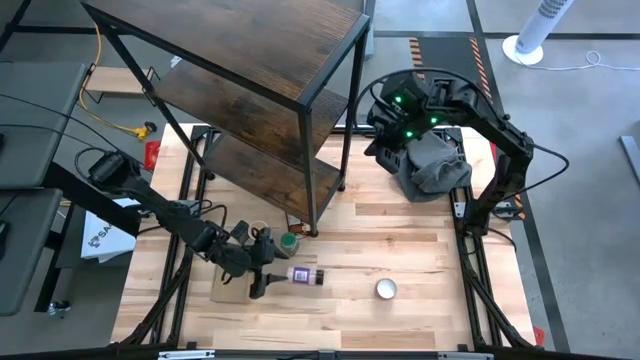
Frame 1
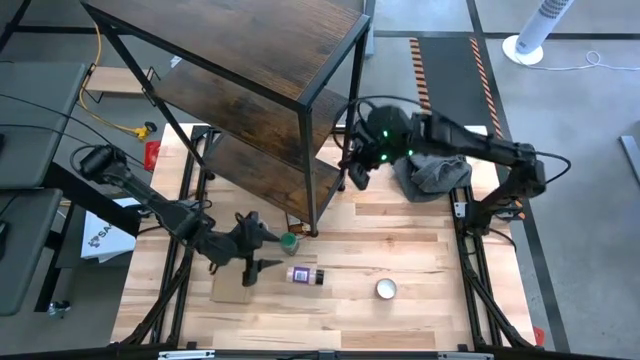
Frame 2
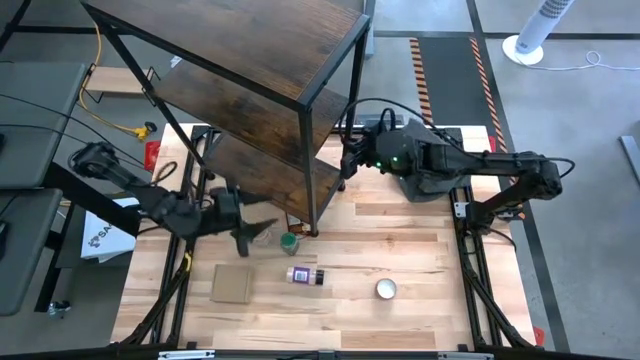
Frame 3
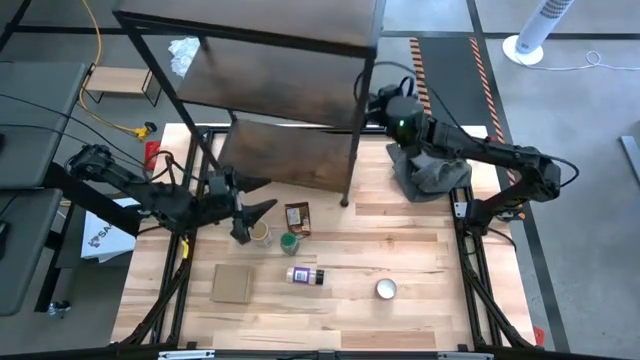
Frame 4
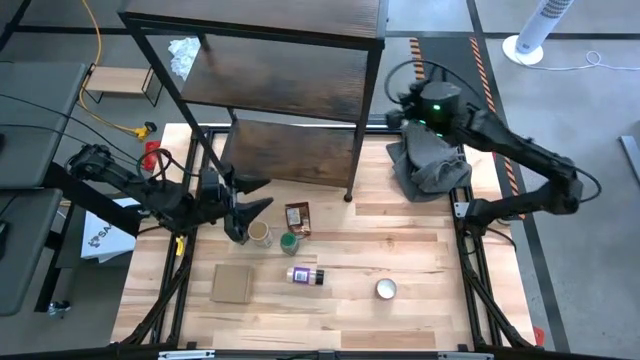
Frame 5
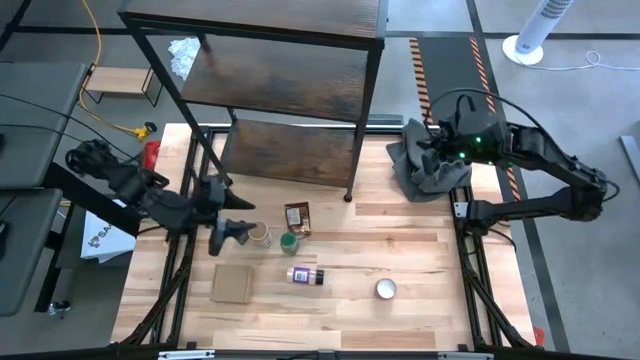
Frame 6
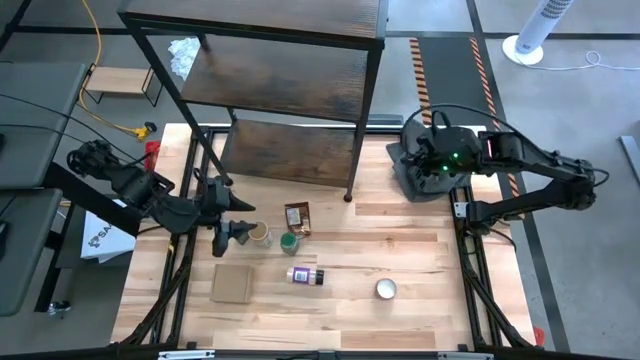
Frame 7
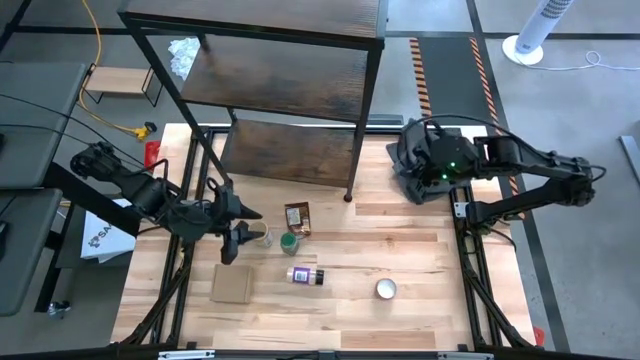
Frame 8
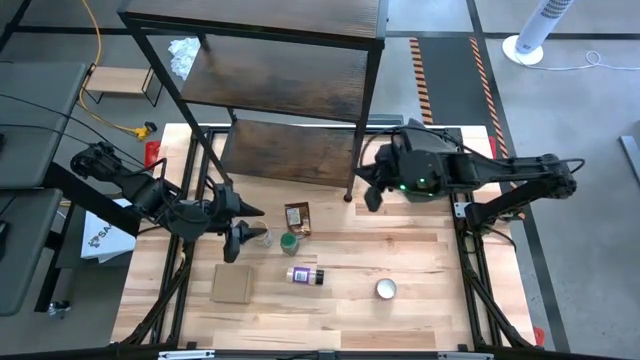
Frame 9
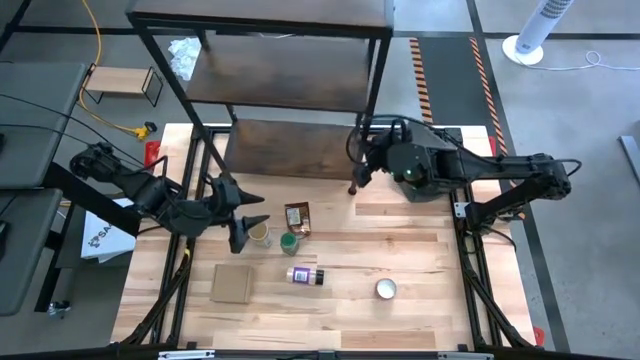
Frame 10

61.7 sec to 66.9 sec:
Task: Shelf spices
Adjust the shelf

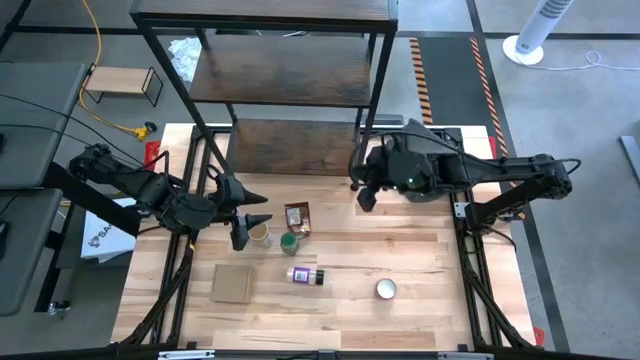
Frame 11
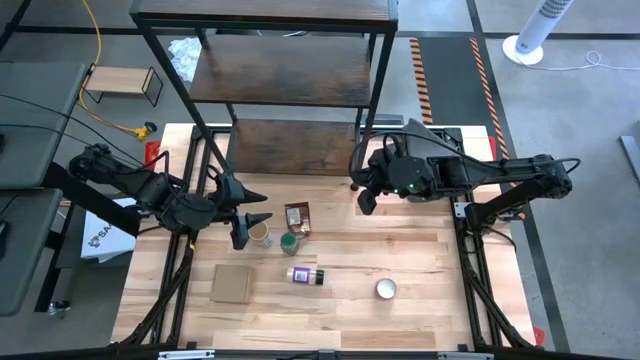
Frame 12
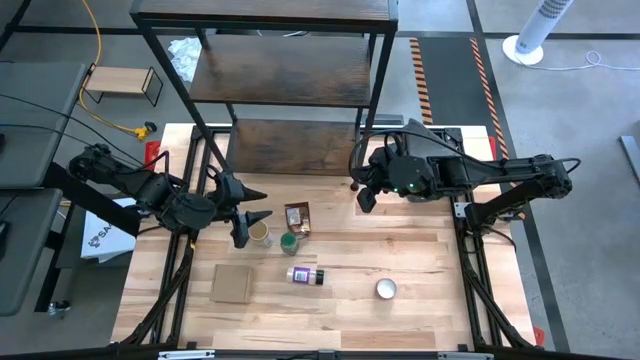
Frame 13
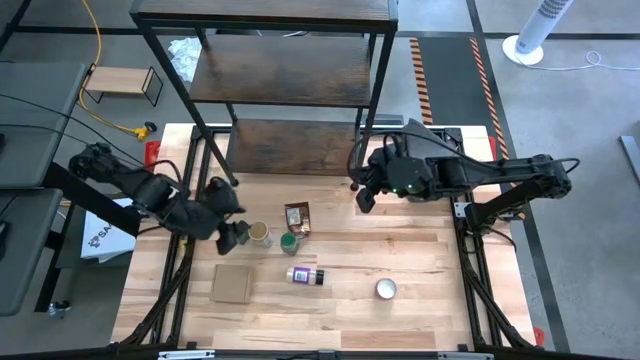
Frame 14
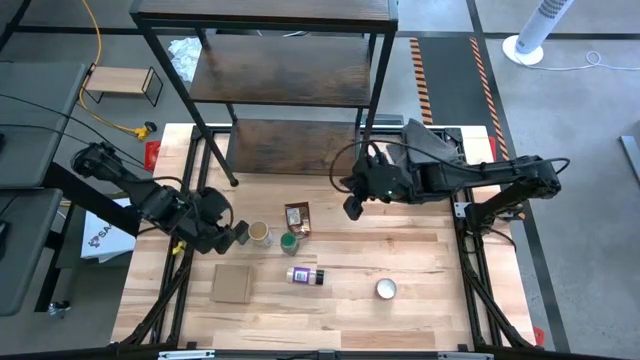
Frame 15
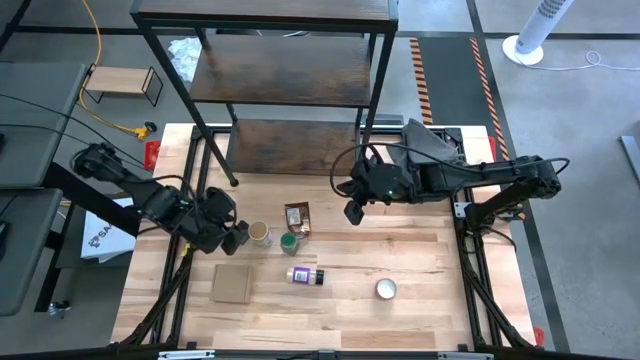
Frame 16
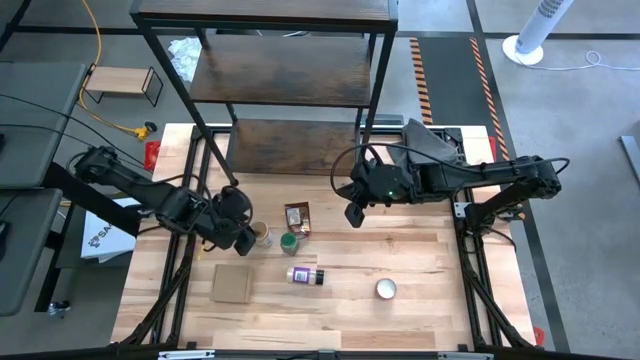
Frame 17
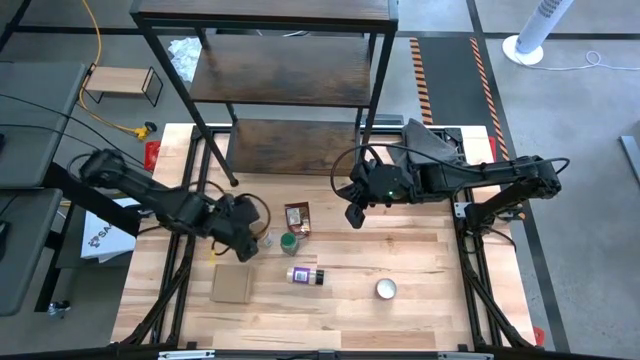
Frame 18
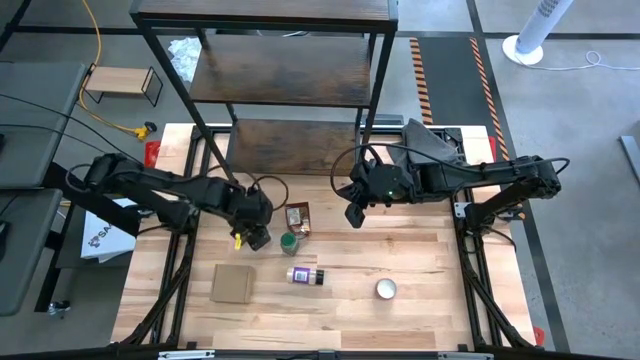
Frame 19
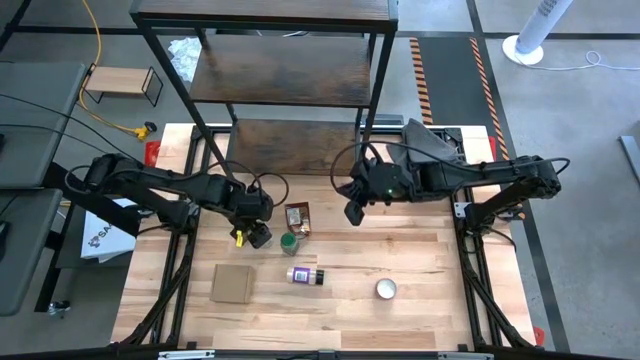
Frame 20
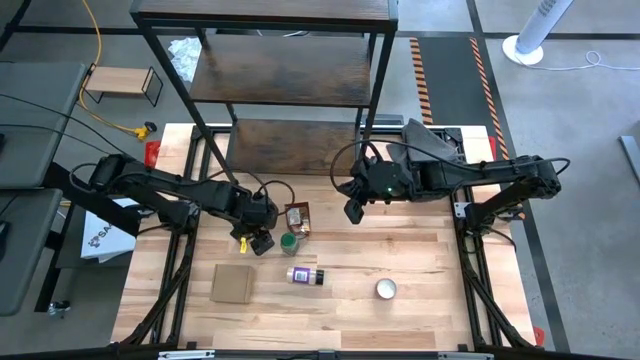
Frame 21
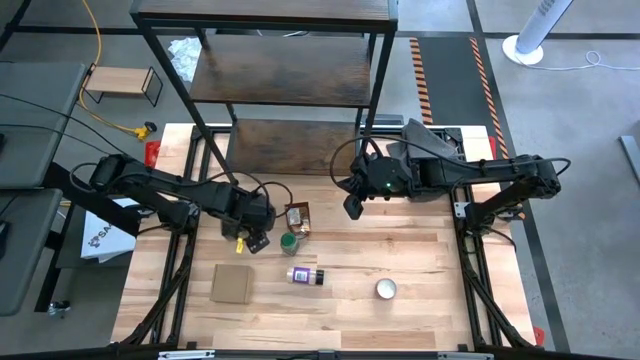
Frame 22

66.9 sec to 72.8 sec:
Put the gold seasoning bottle on the shelf

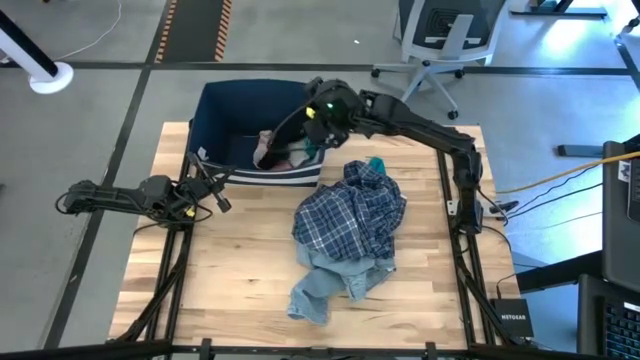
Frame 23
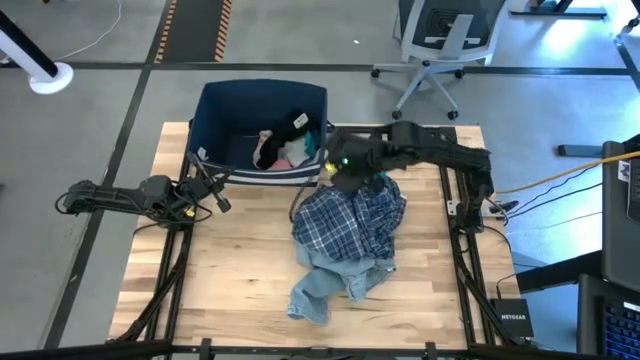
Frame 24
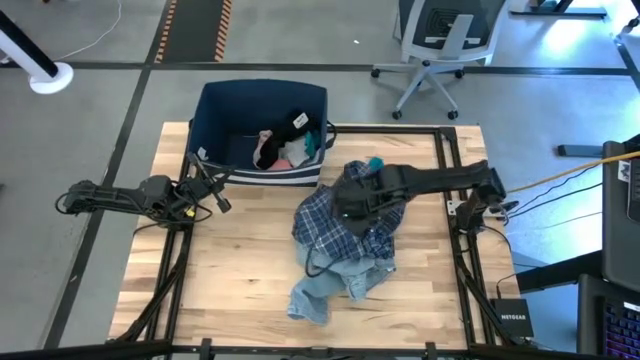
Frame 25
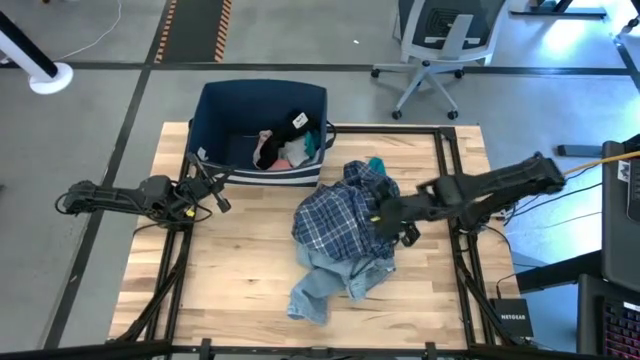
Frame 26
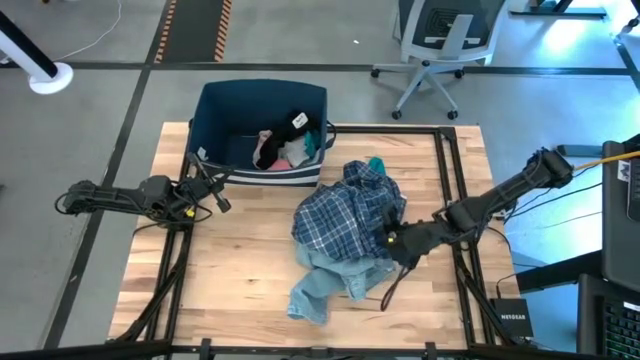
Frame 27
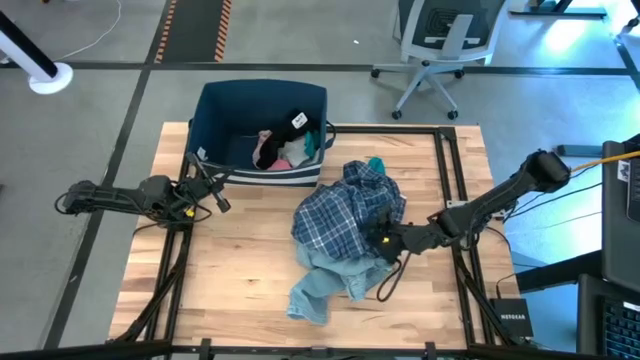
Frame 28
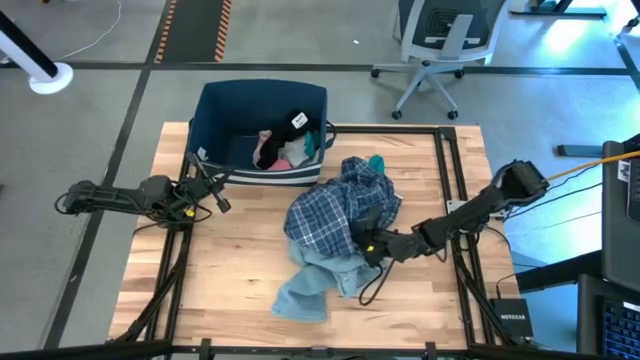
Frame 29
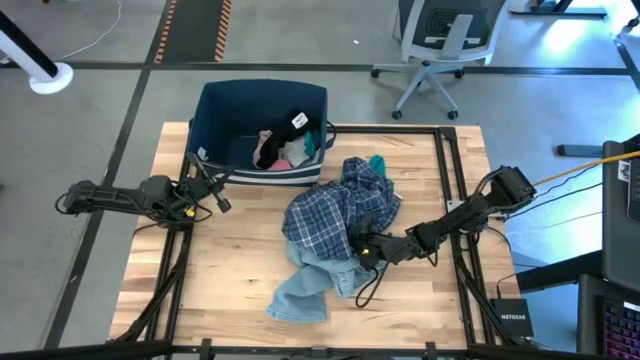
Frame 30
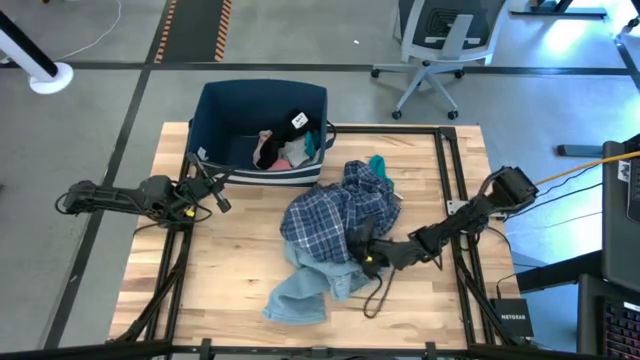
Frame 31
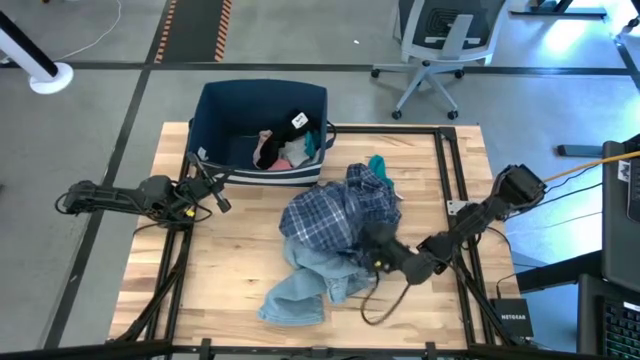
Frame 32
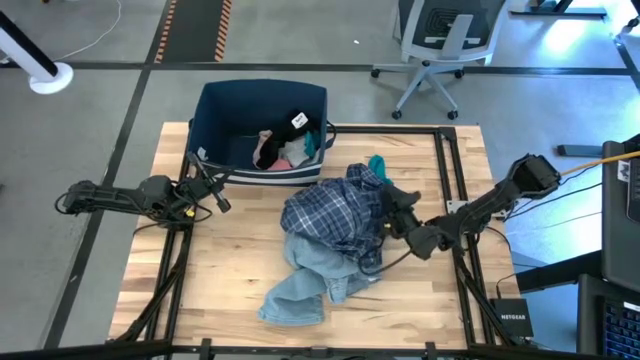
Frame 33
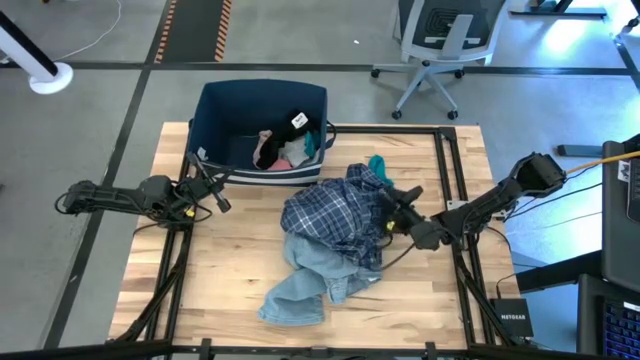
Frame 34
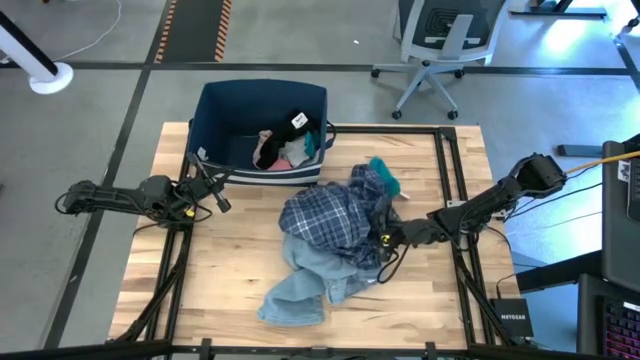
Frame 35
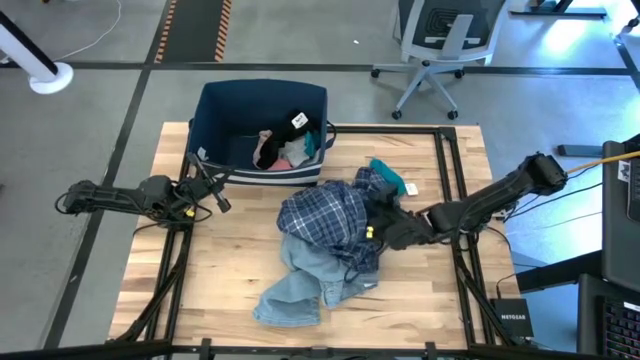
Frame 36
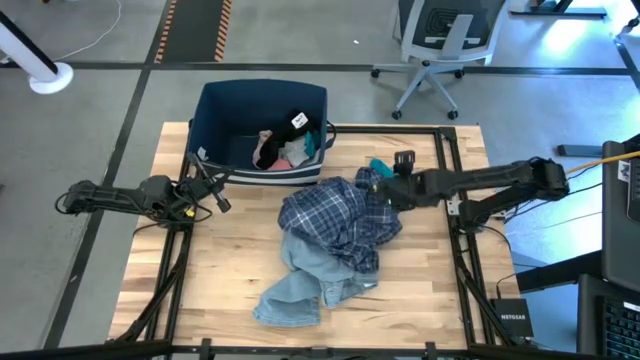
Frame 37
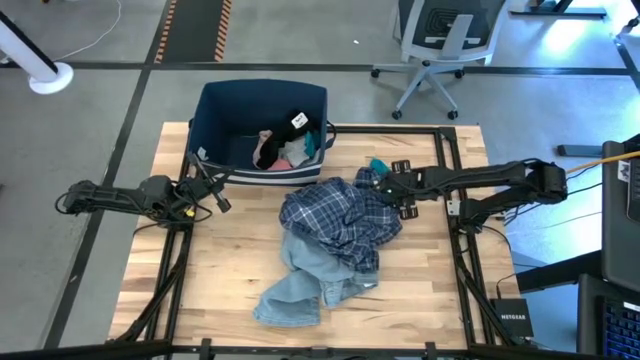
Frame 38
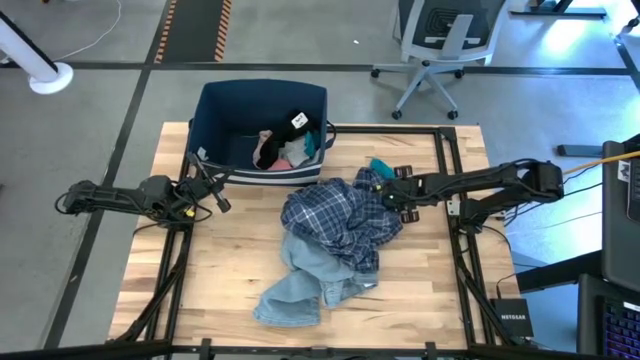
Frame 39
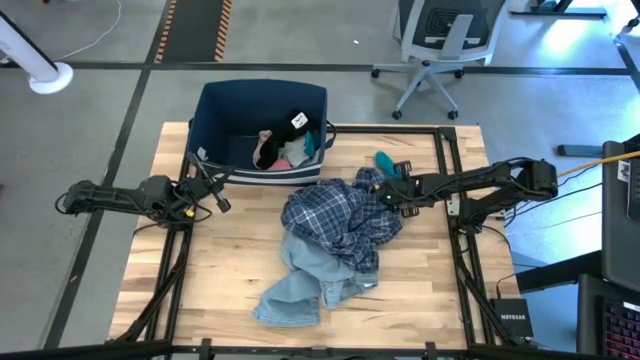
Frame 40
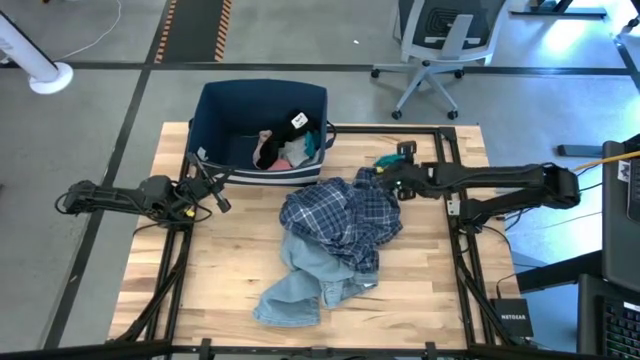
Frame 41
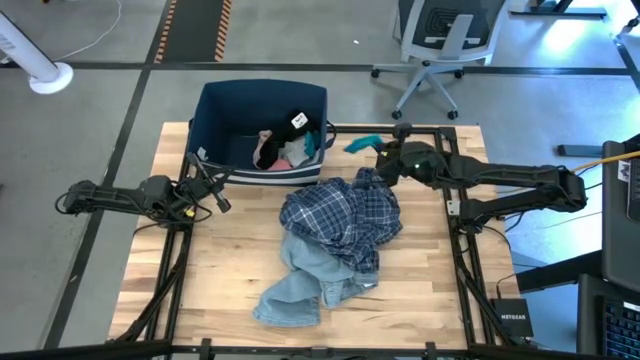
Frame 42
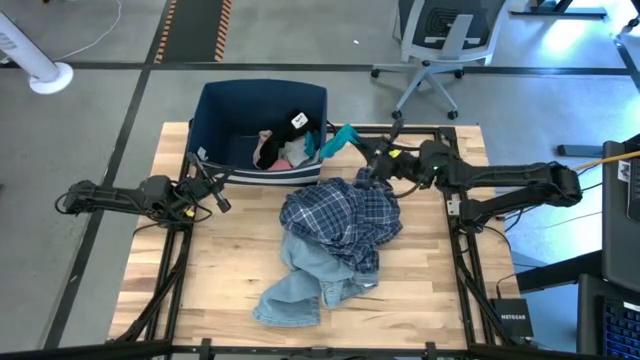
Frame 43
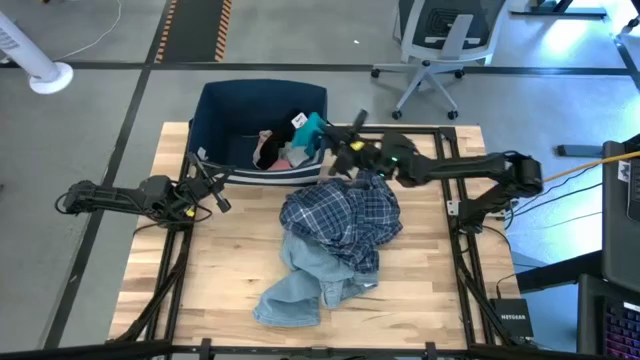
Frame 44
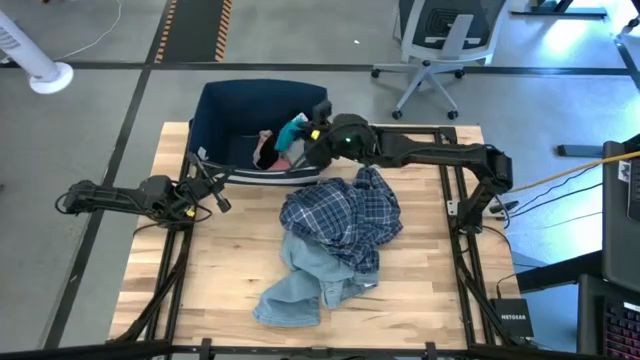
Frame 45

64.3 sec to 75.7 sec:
Task: Sort clothes
Put the blue sock into the blue laundry bin
